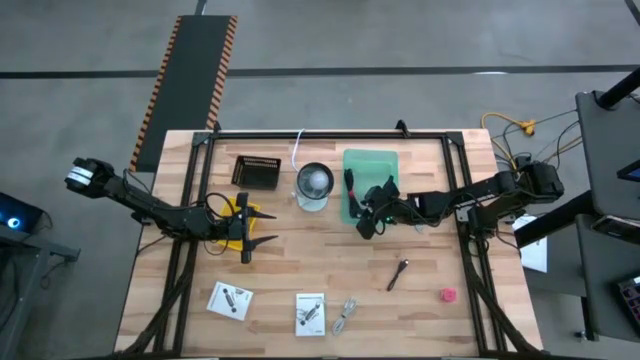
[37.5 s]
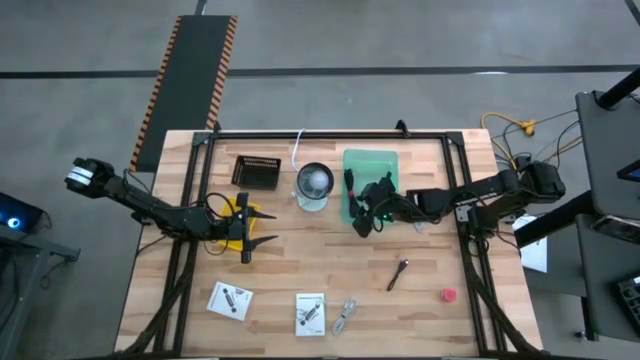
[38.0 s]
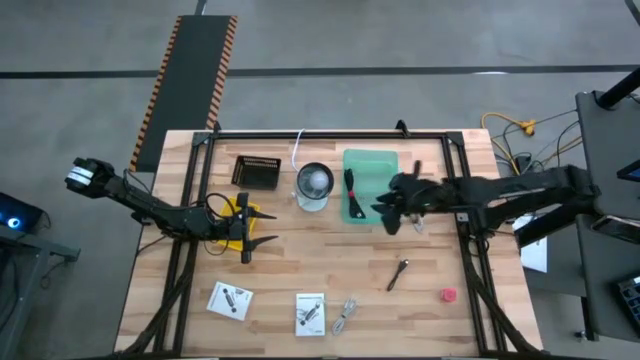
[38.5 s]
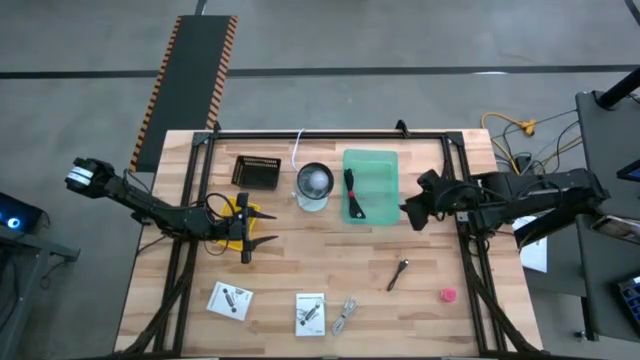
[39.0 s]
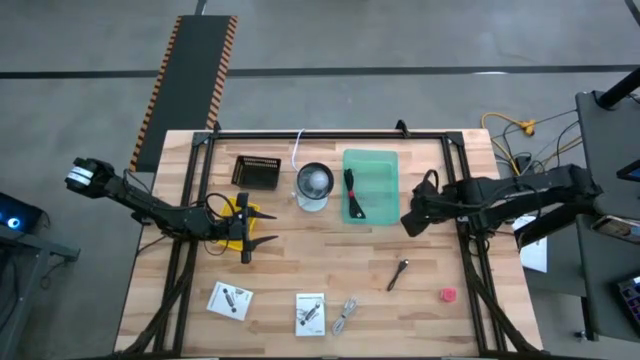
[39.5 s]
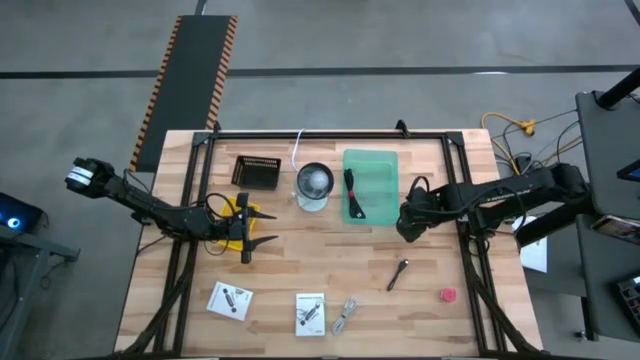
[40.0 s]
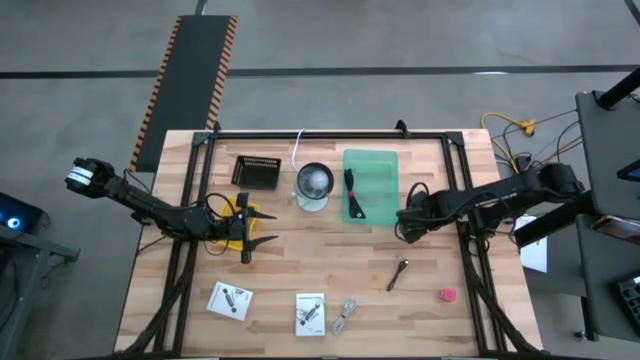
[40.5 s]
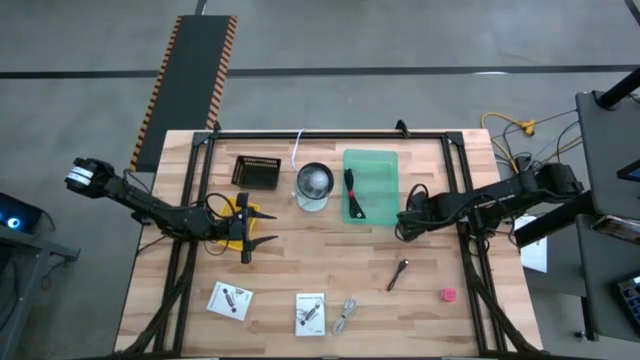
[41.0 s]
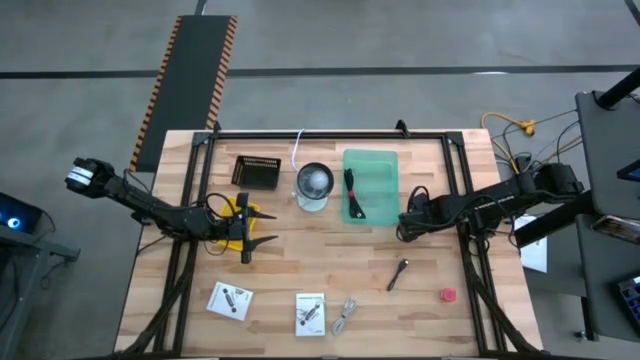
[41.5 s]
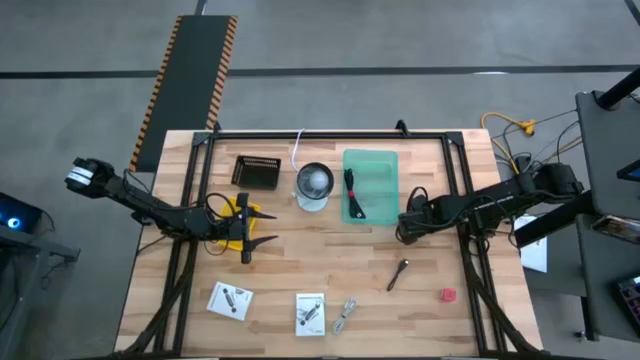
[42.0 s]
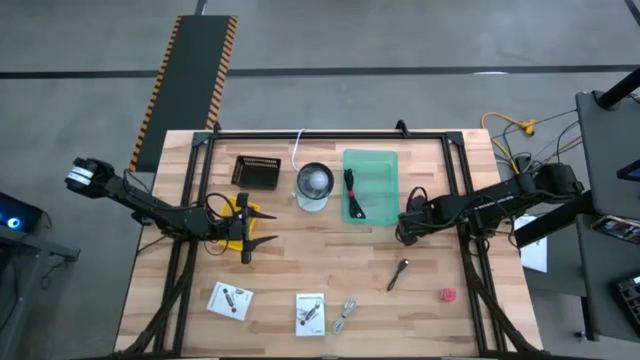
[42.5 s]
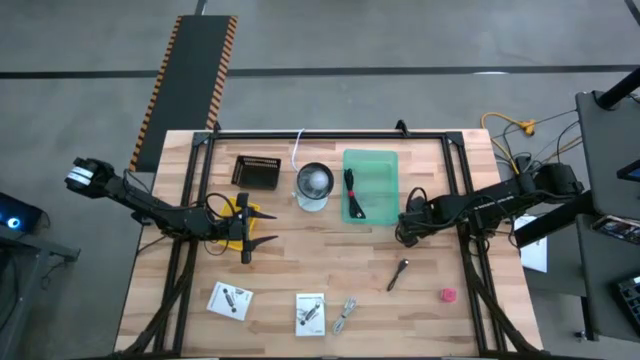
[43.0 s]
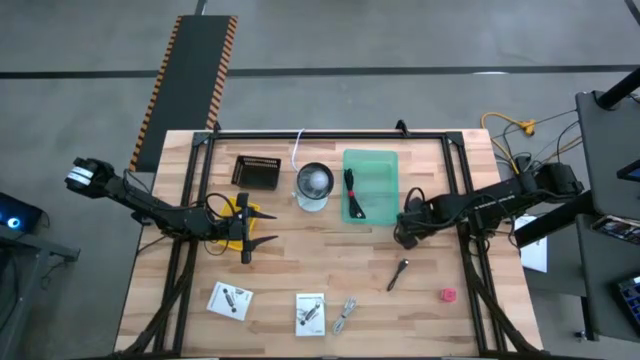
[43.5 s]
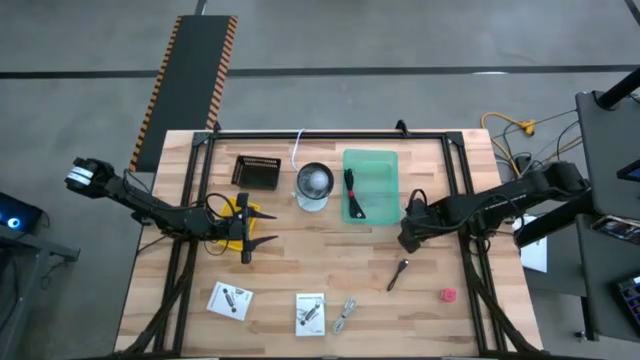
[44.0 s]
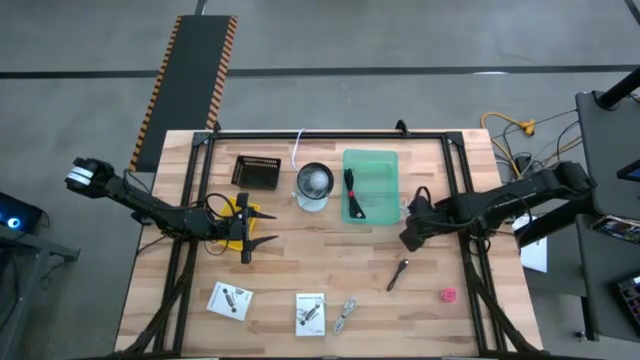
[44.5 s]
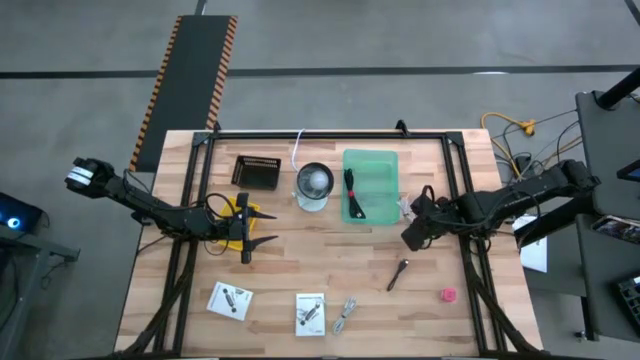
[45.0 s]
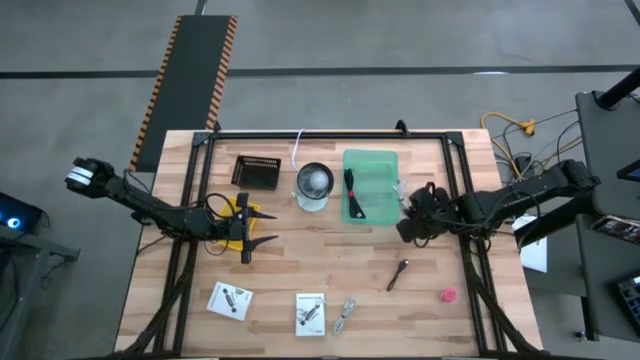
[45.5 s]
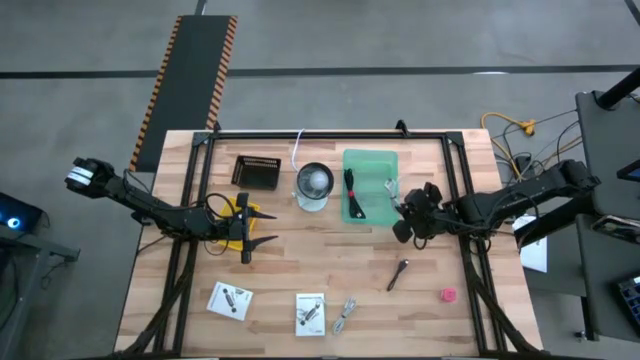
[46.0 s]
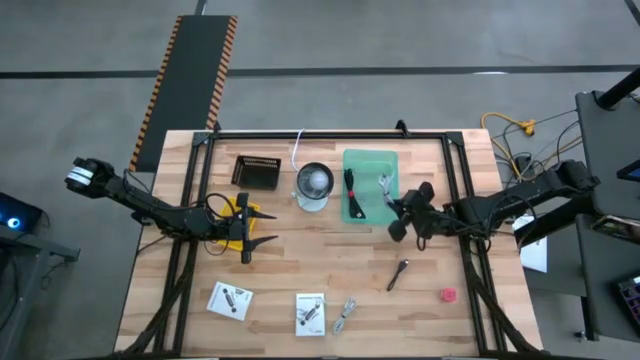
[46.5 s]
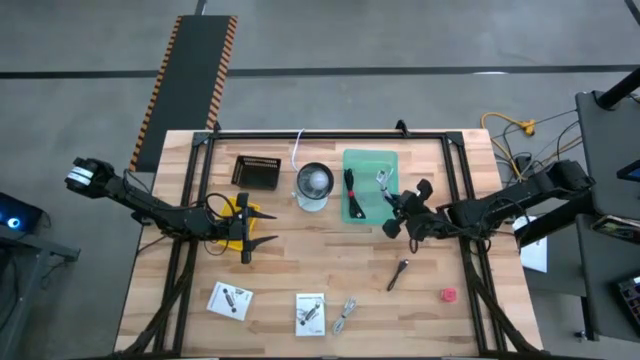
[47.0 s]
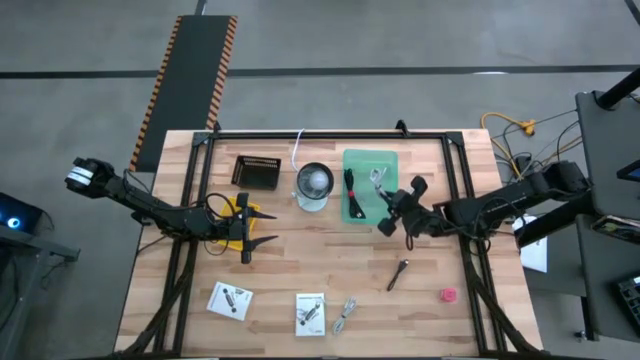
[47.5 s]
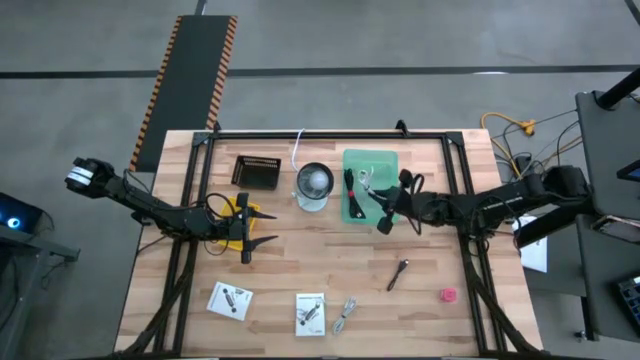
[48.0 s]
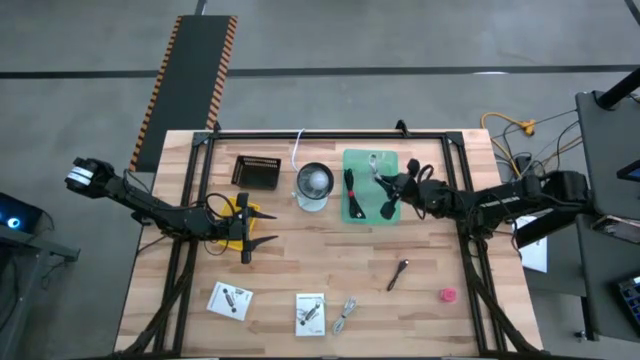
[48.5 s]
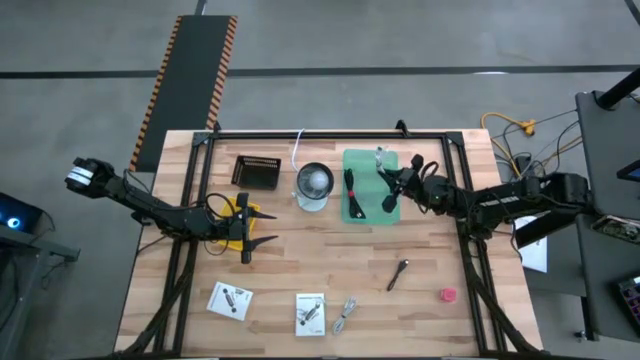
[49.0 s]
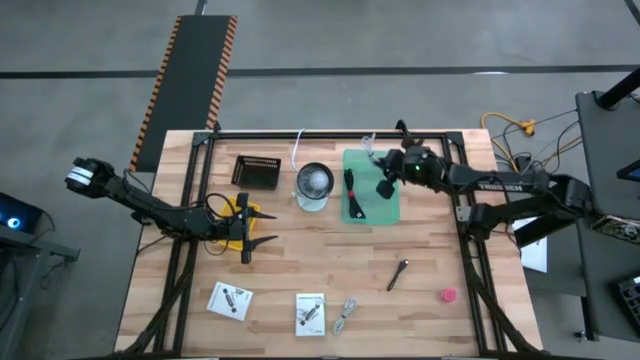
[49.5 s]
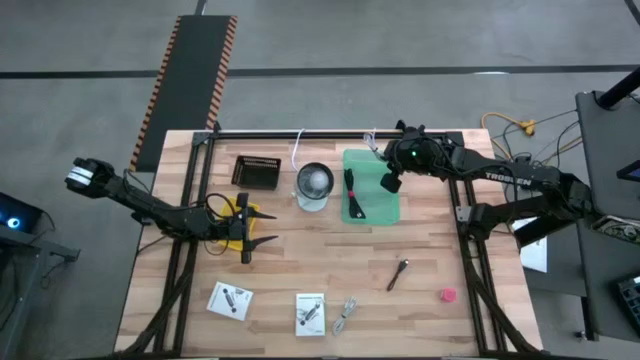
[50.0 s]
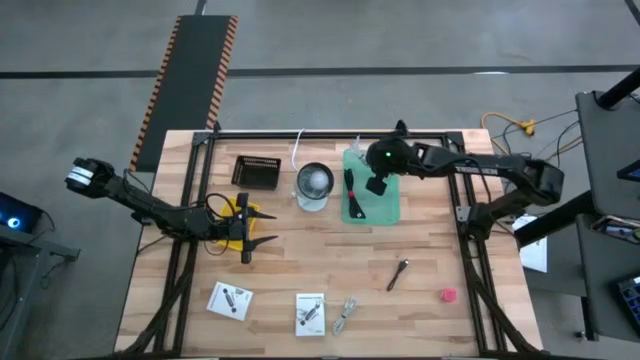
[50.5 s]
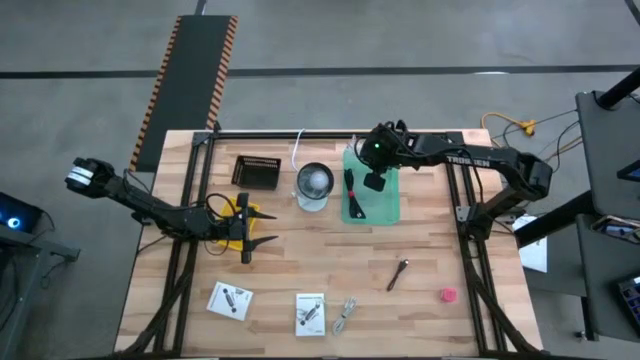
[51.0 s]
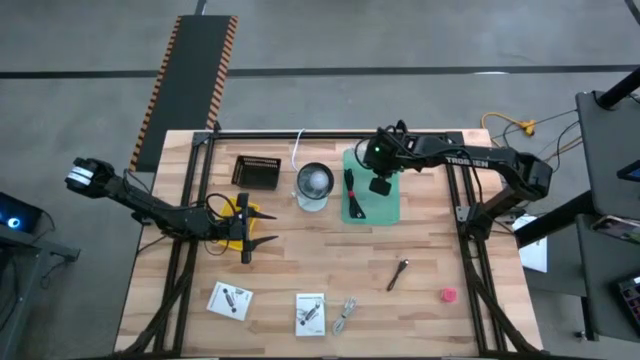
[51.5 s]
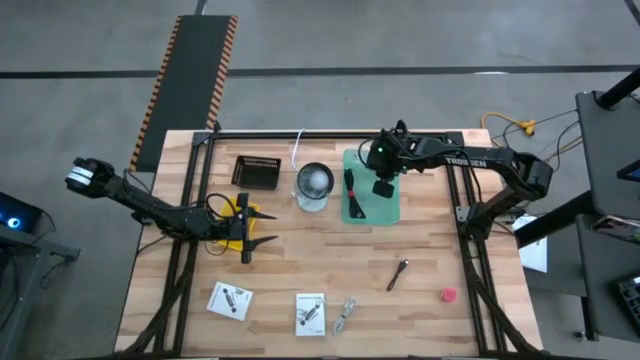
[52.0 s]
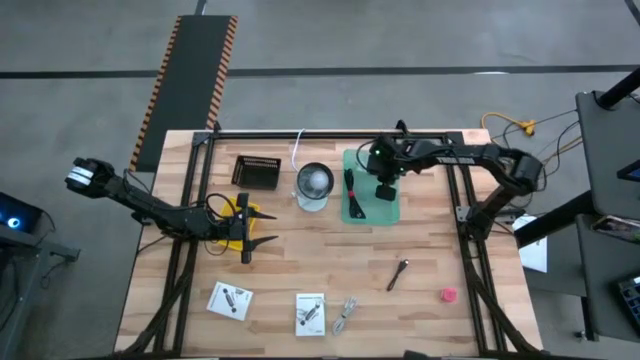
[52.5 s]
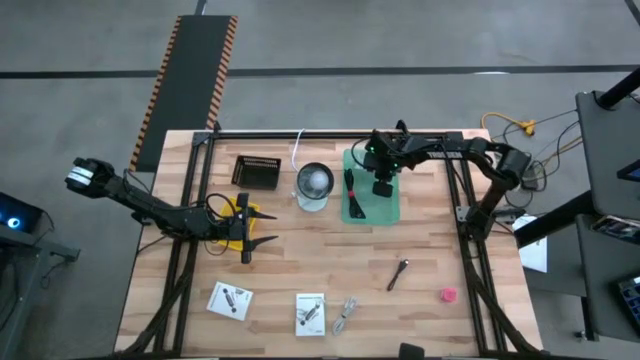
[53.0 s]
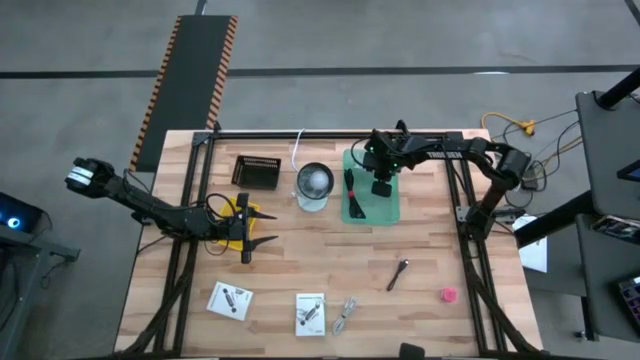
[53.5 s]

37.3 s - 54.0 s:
Task: Pick and place items into bin
Put the top white charger cable into the green bin

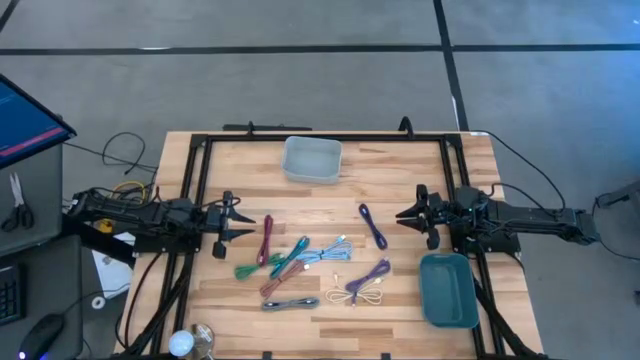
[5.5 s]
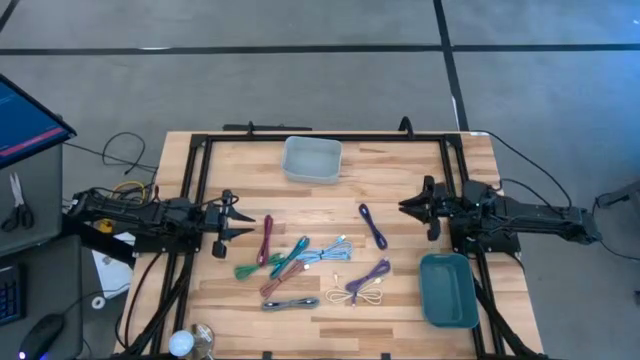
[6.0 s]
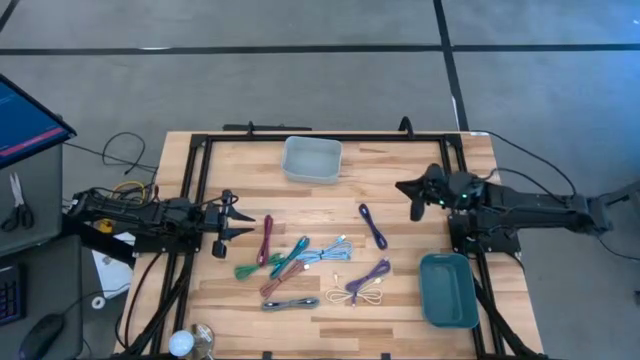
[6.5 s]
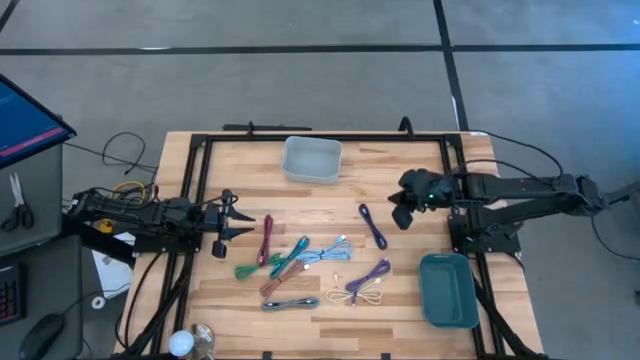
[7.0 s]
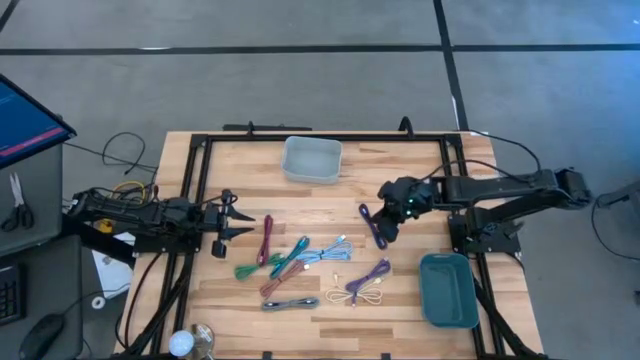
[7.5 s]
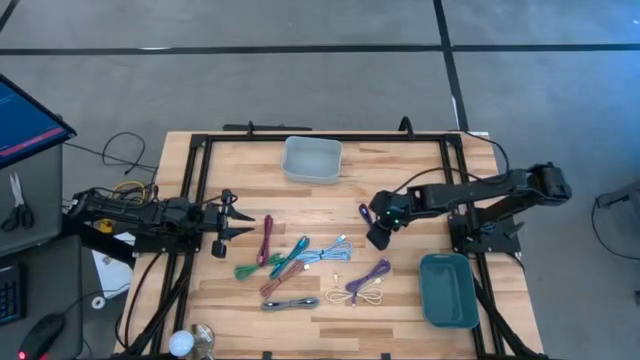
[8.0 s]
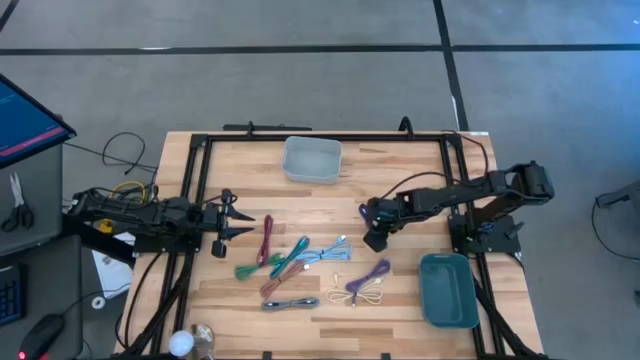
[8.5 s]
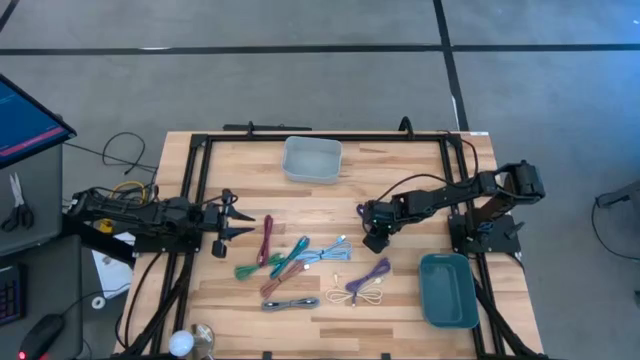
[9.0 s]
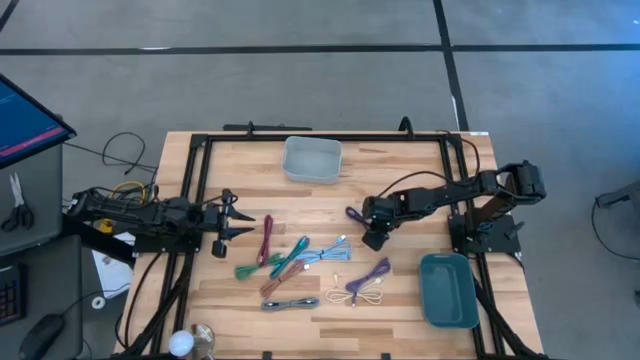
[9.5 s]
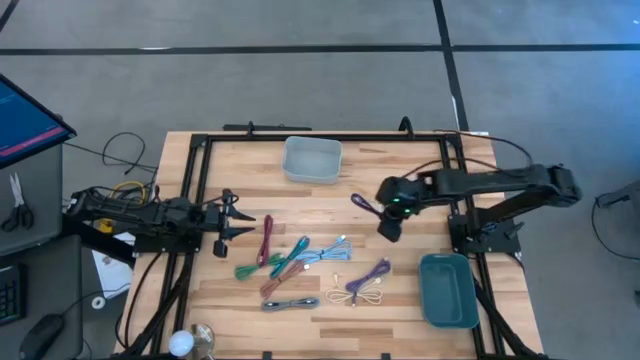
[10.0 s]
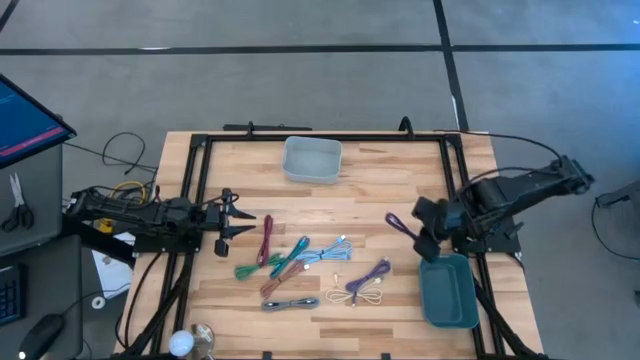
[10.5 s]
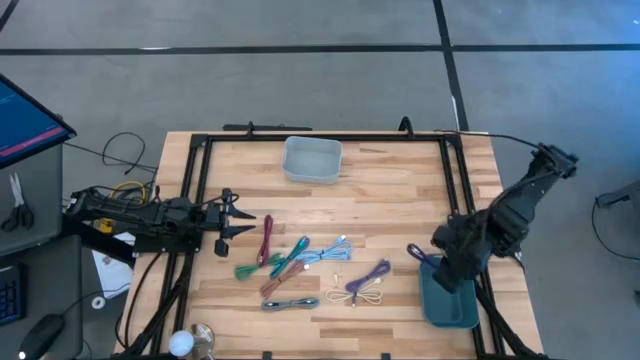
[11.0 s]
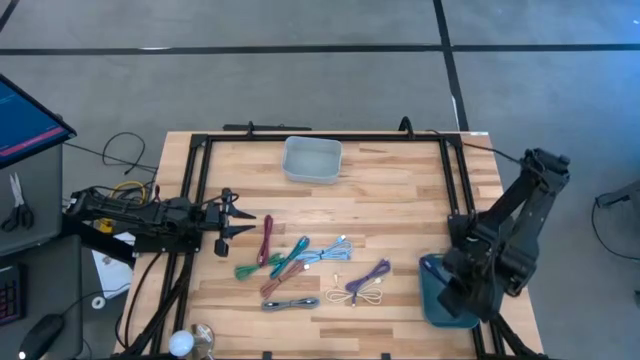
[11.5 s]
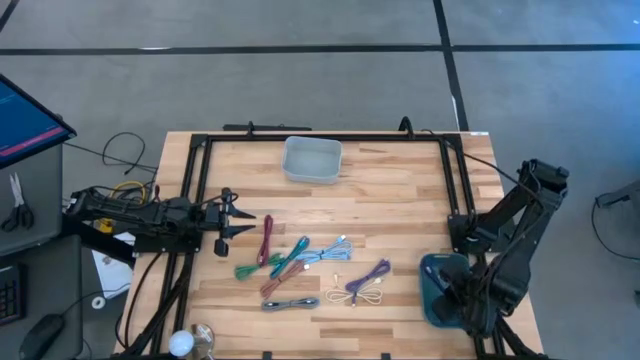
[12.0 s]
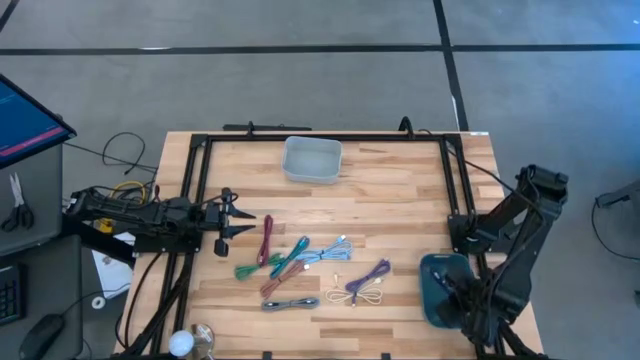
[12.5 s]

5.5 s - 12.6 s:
Task: Pick & Place USB Port
Put the violet patterned charger cable into the blue bin
